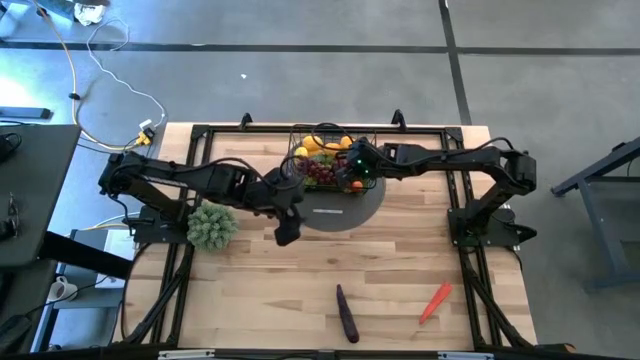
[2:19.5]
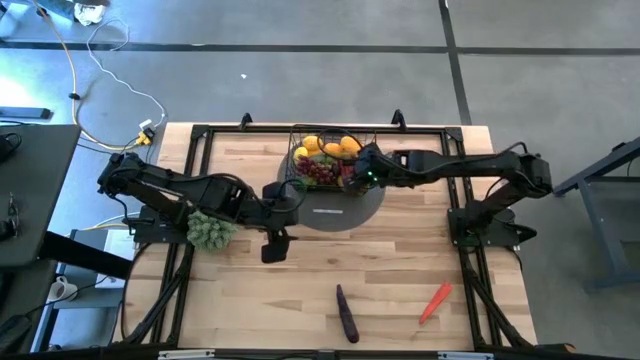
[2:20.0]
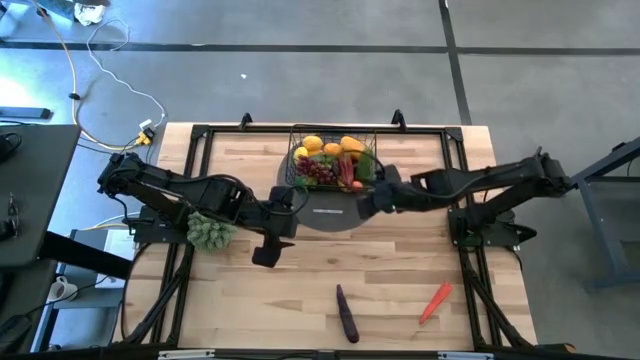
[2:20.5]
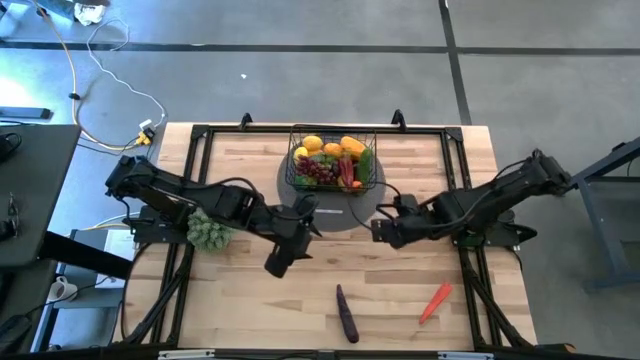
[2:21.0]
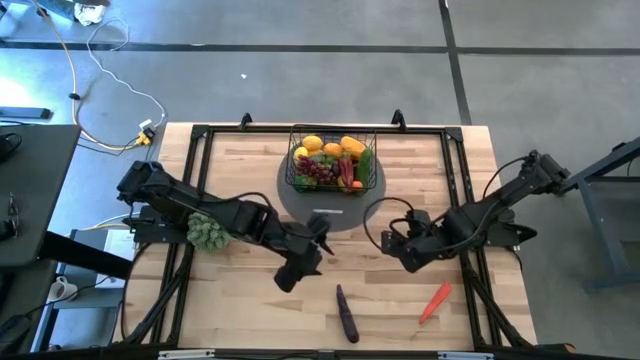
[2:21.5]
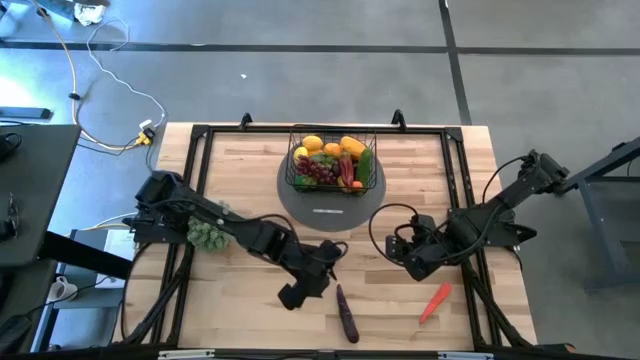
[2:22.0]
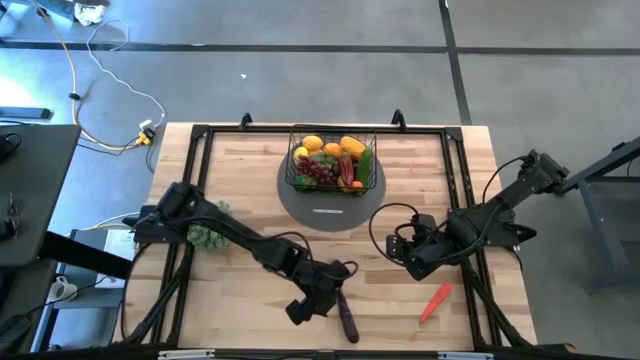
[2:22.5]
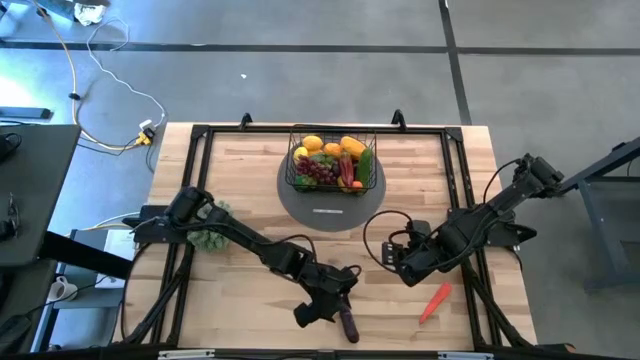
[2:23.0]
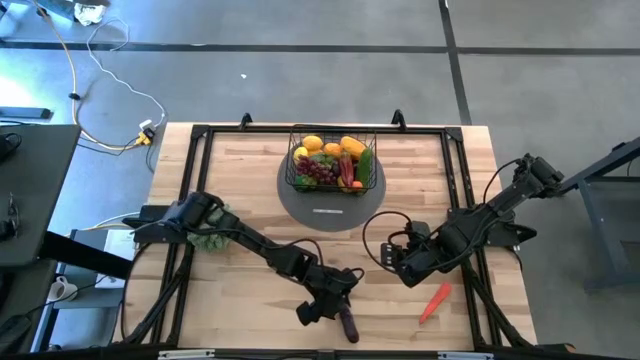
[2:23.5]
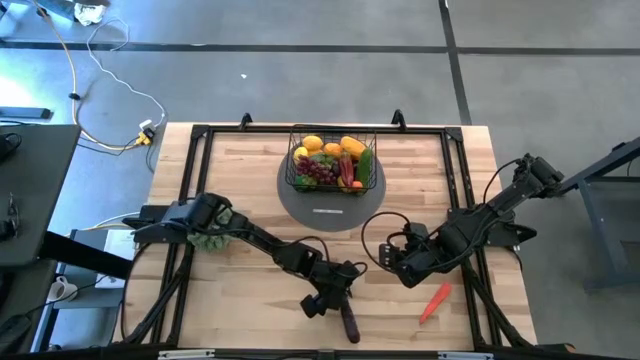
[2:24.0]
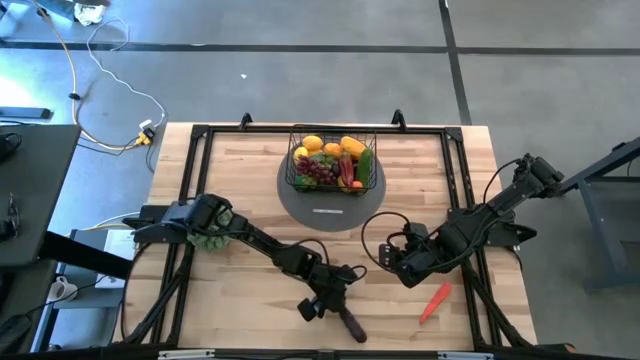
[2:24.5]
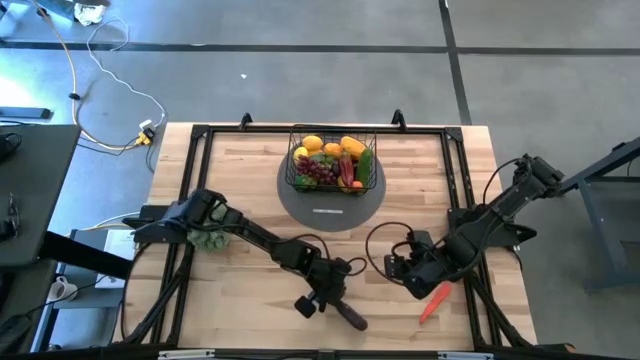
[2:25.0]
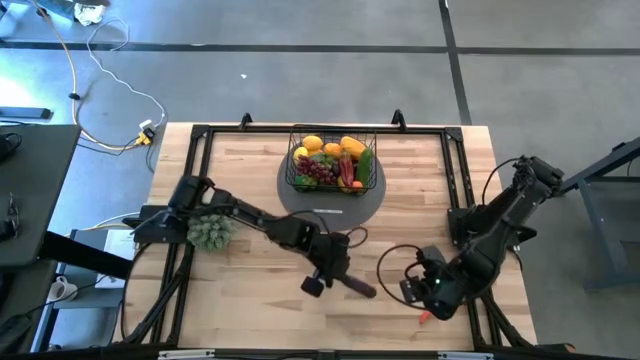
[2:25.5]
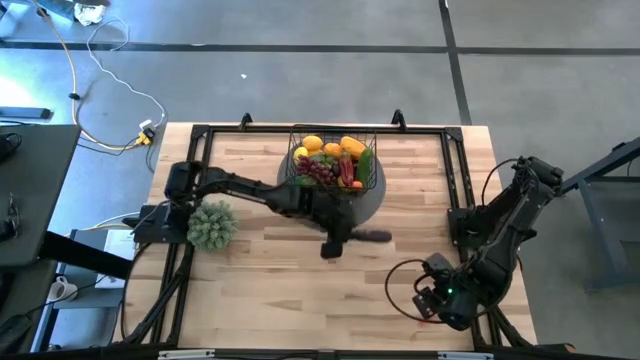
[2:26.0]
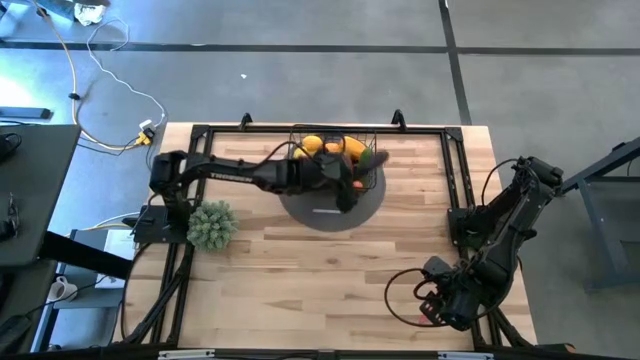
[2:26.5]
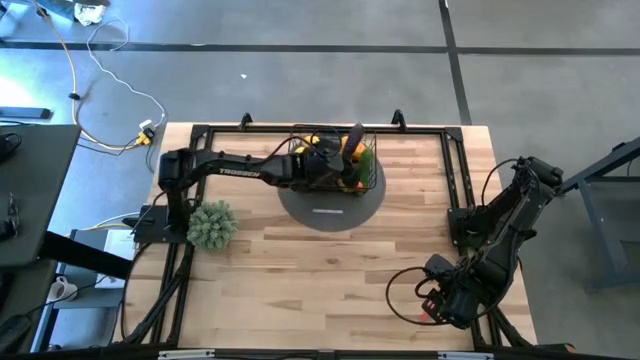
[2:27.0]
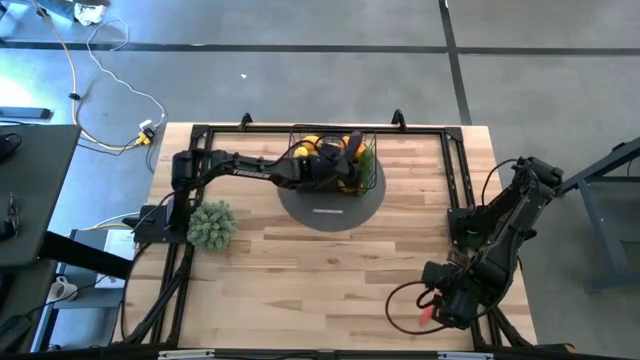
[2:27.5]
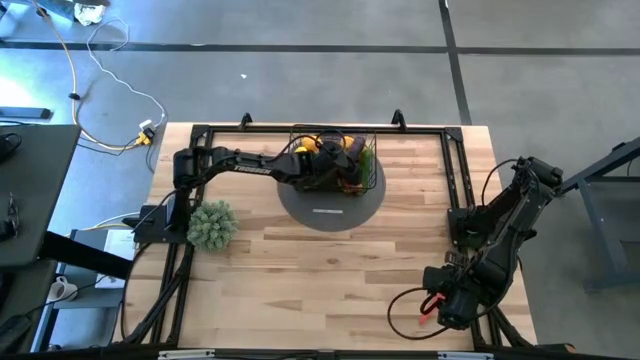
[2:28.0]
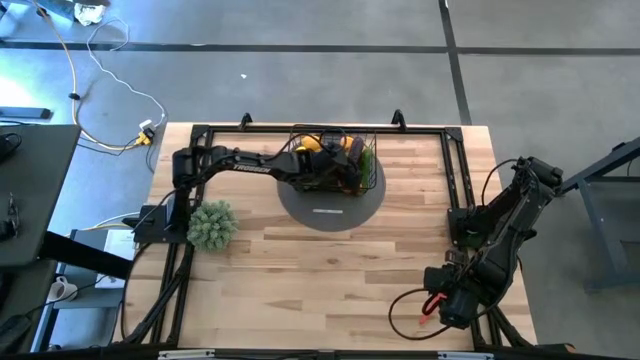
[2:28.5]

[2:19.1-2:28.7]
Task: Build produce basket
Put the violet eggplant into the wire basket

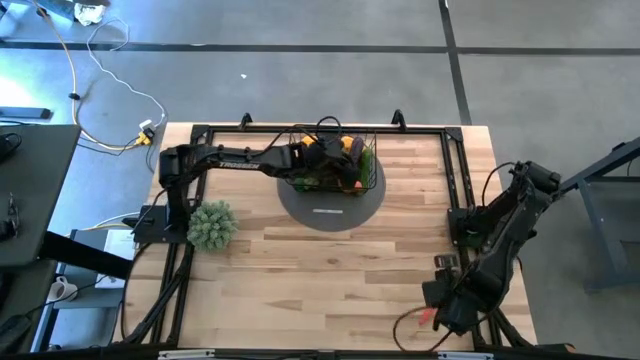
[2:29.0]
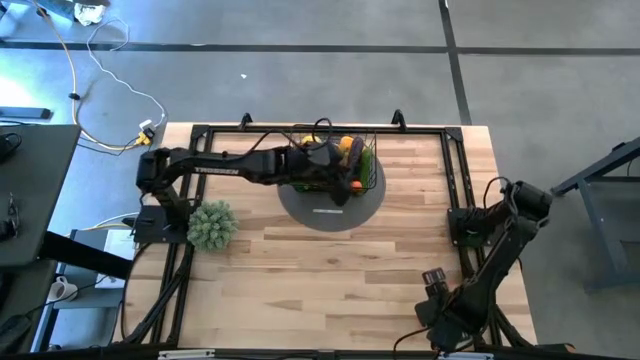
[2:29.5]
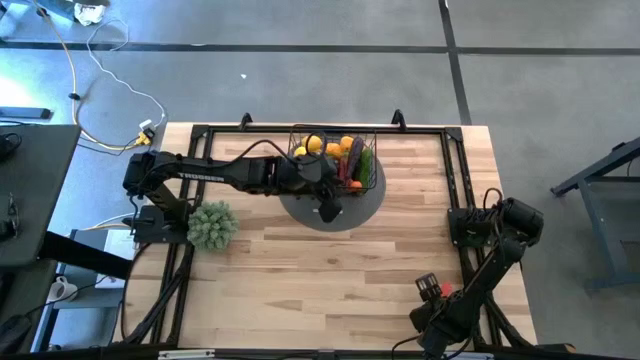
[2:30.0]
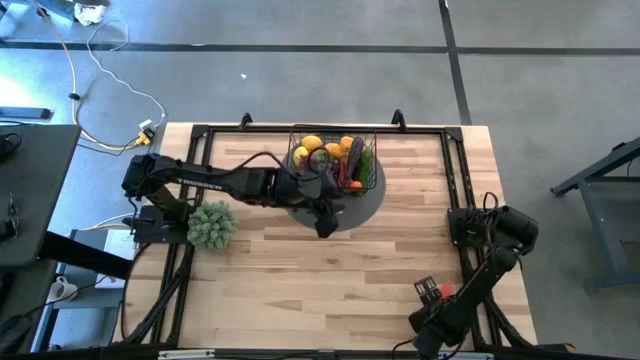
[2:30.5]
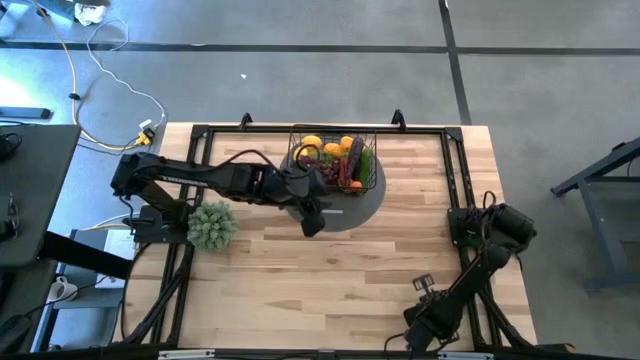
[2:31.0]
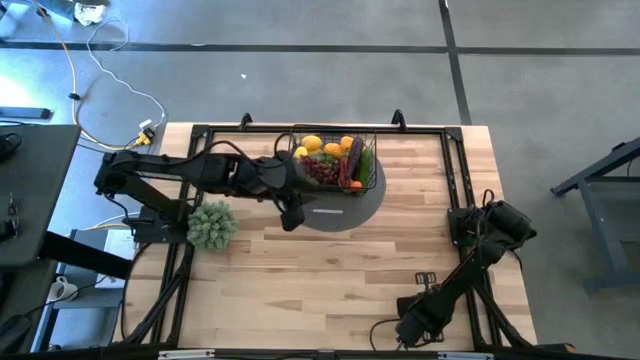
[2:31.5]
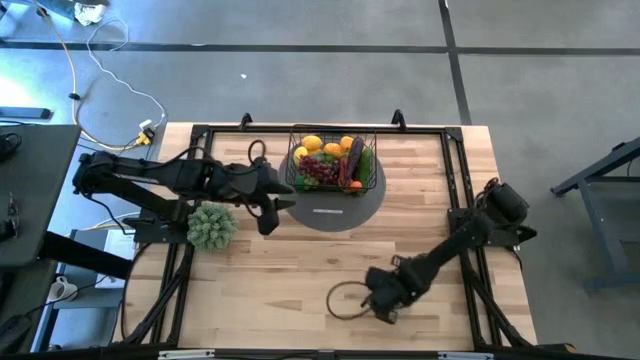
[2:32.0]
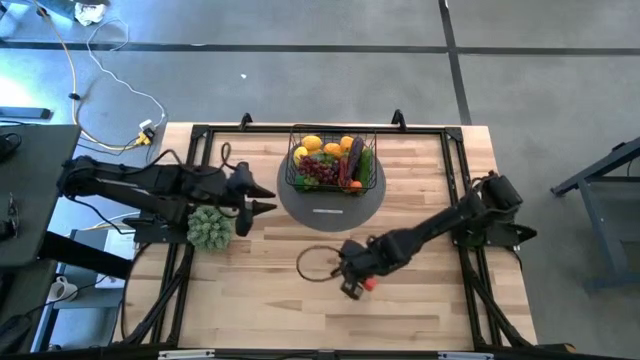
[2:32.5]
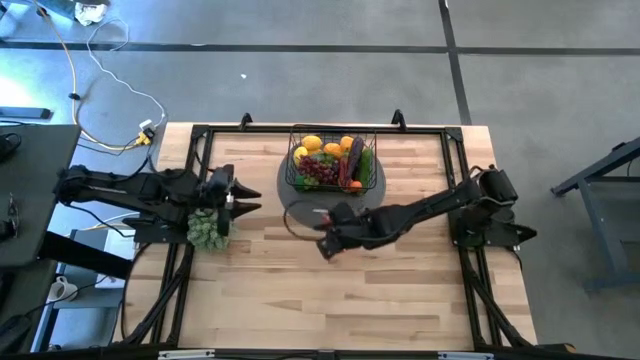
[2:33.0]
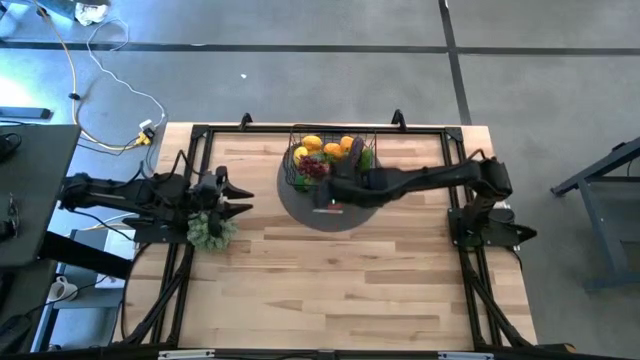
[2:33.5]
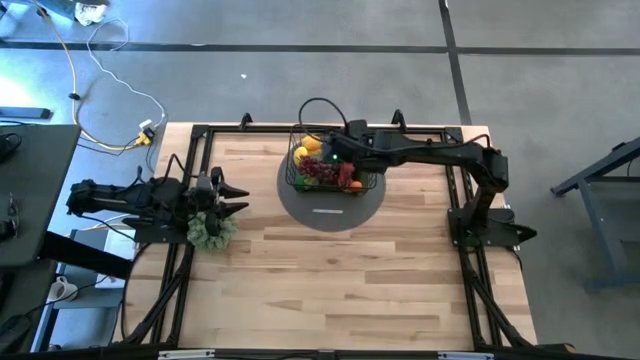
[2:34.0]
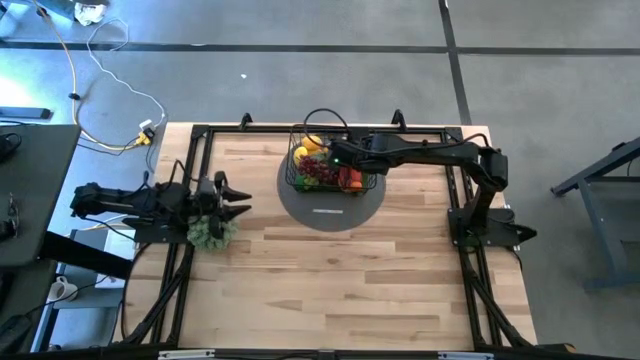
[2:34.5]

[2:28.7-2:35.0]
Put the carrot into the wire basket

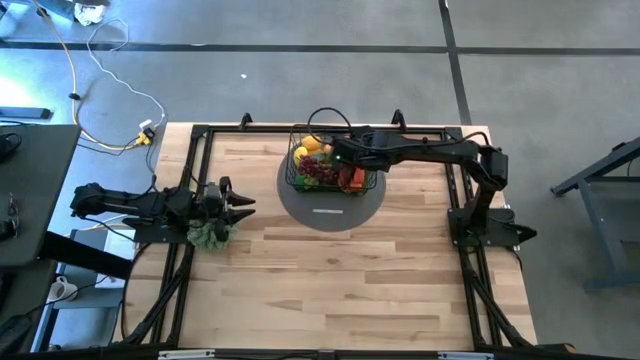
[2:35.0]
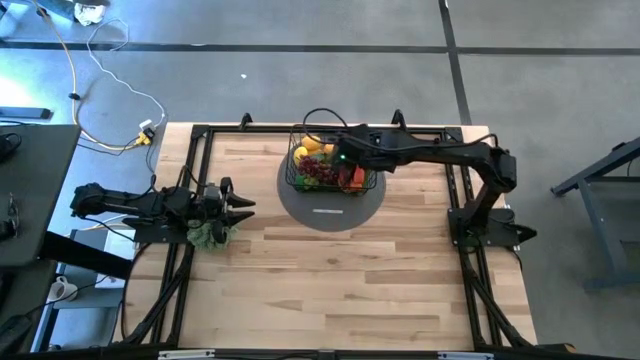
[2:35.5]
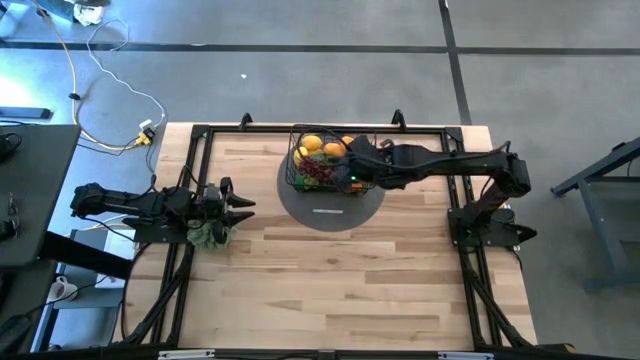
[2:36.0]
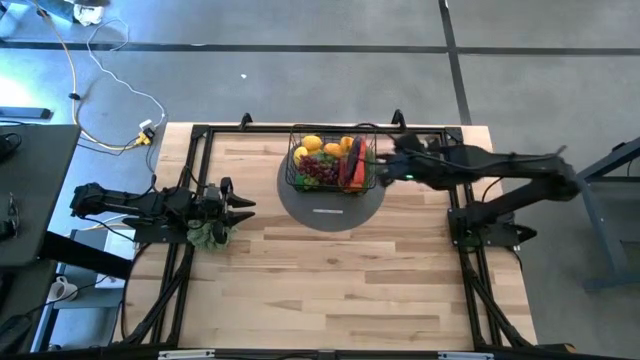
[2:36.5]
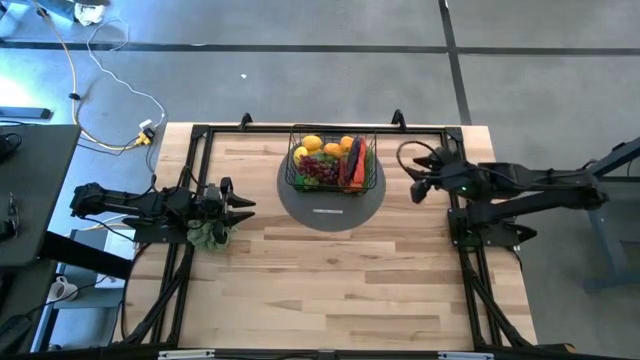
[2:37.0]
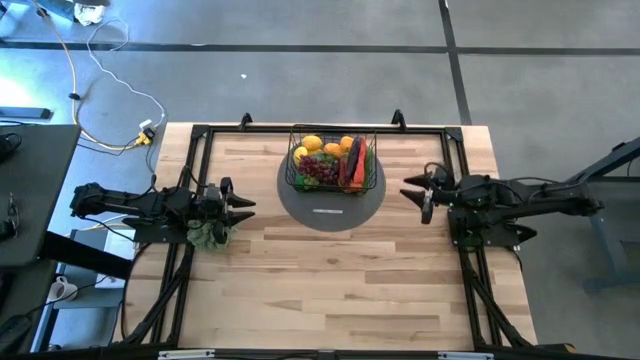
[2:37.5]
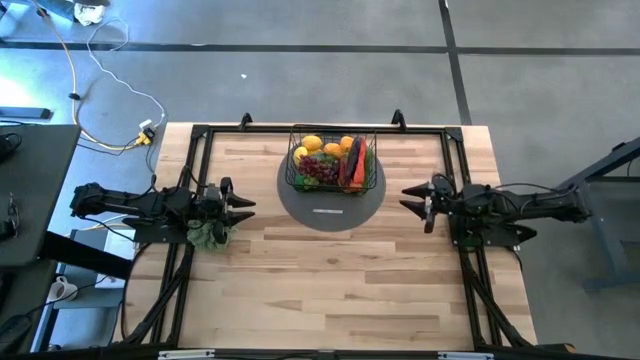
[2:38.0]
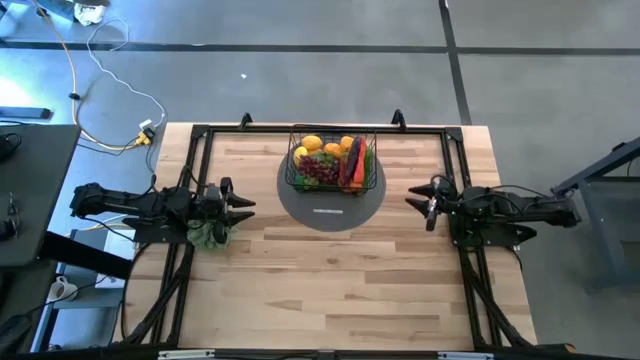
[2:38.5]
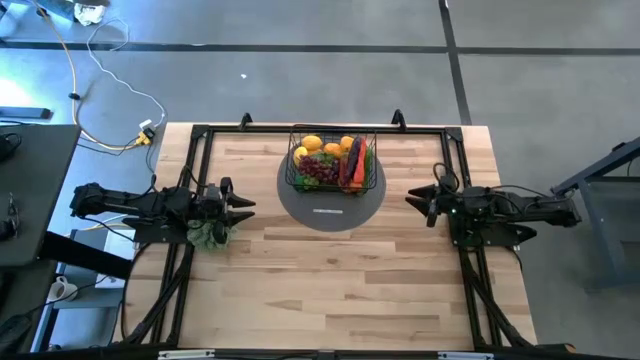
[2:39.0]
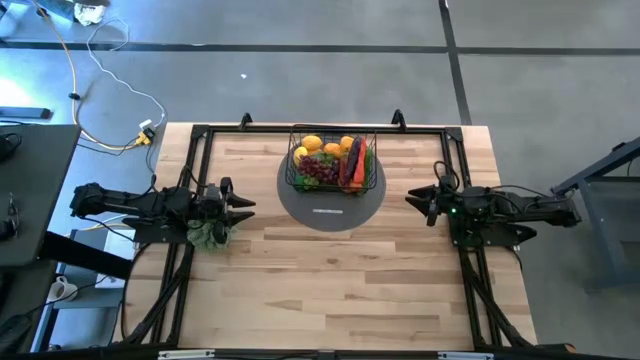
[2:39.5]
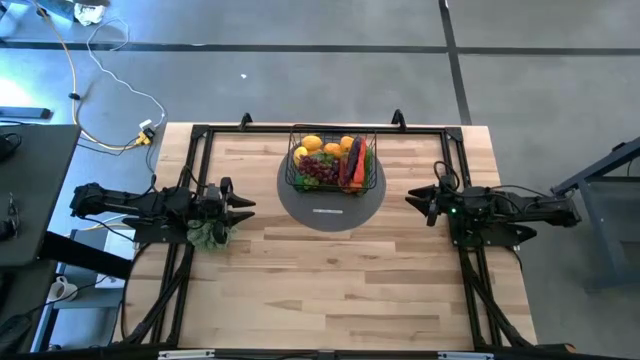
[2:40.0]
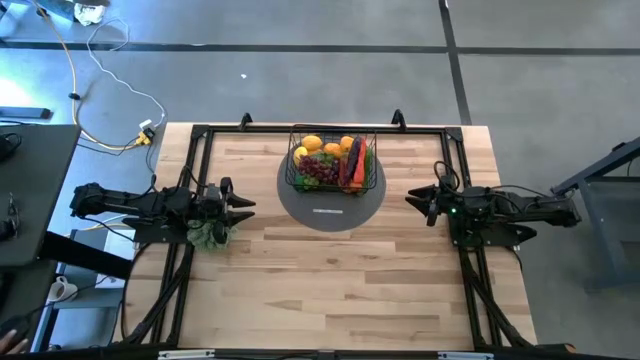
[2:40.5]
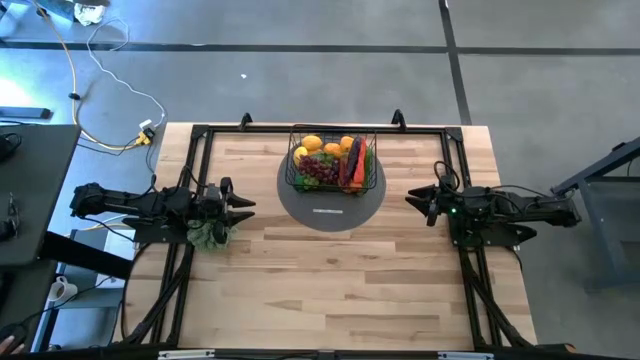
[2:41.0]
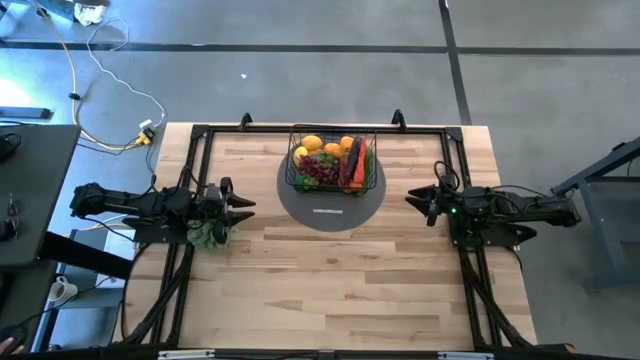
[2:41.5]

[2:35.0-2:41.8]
Return to Home Position
